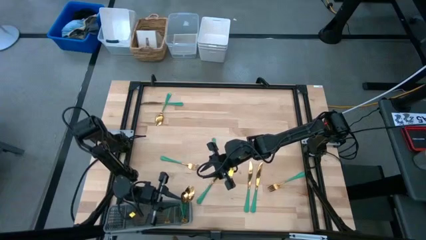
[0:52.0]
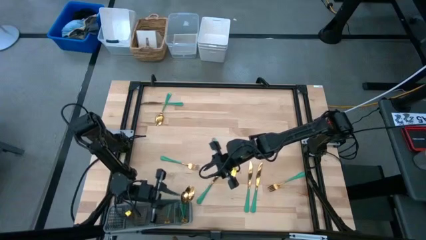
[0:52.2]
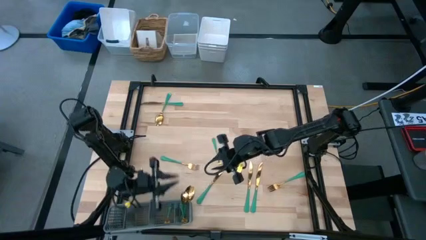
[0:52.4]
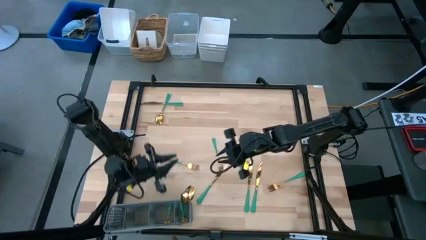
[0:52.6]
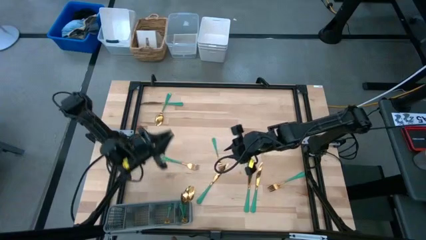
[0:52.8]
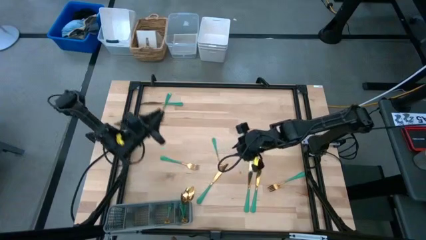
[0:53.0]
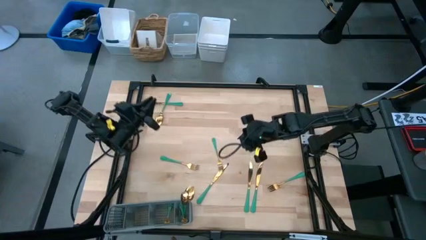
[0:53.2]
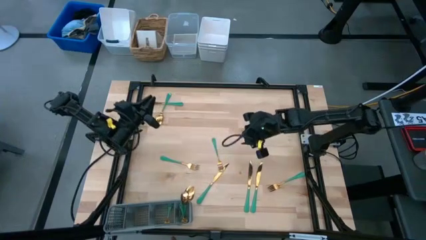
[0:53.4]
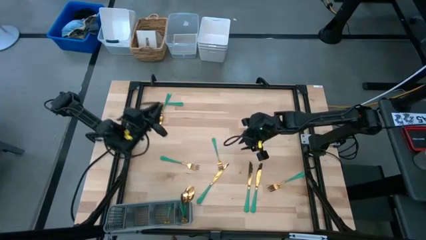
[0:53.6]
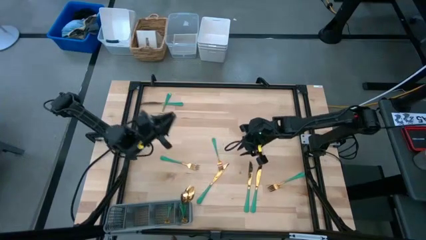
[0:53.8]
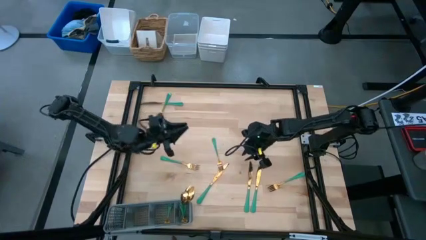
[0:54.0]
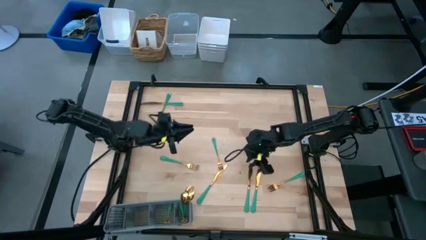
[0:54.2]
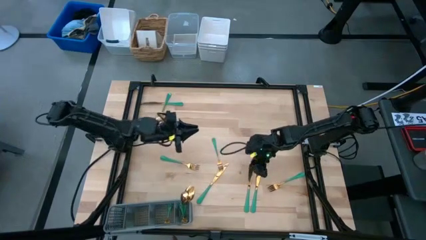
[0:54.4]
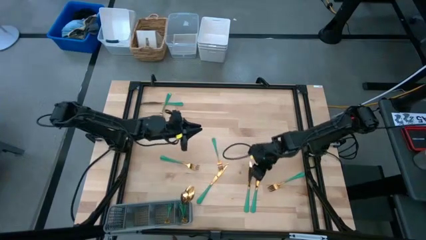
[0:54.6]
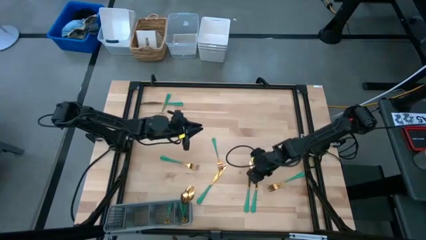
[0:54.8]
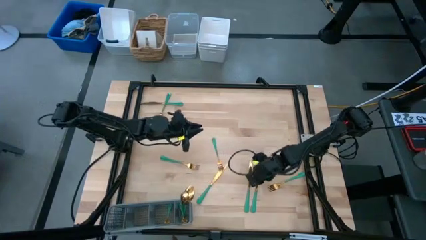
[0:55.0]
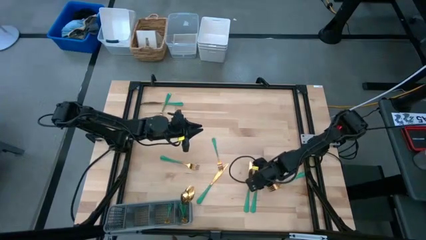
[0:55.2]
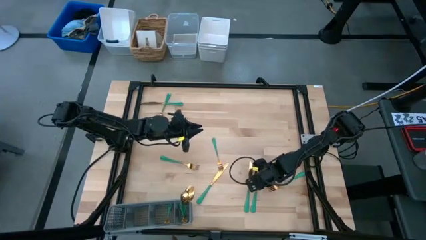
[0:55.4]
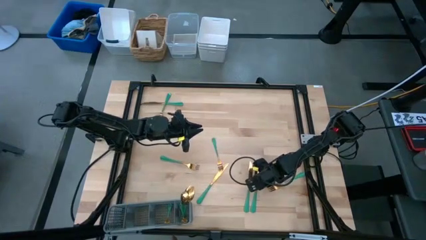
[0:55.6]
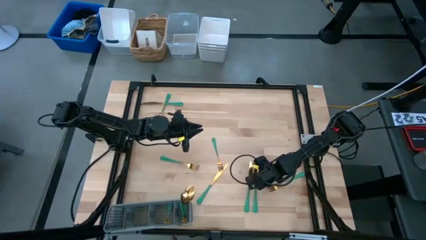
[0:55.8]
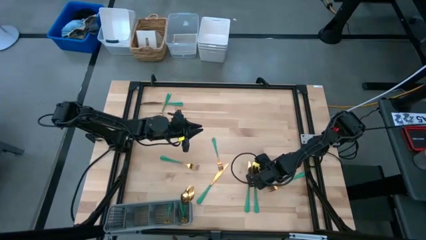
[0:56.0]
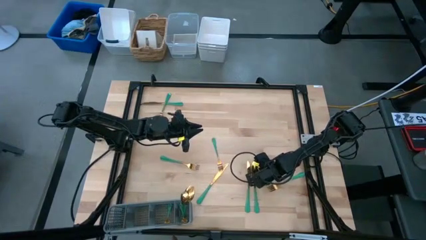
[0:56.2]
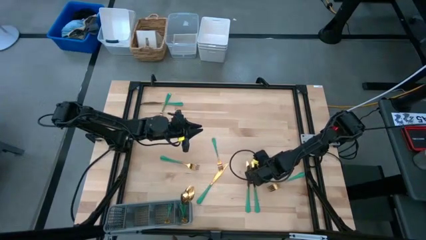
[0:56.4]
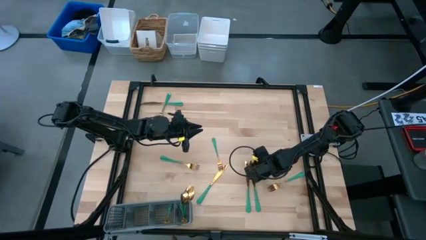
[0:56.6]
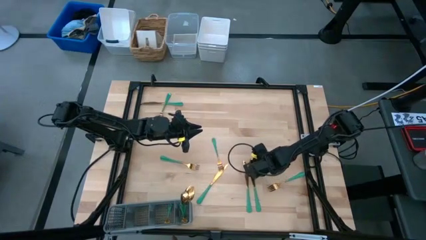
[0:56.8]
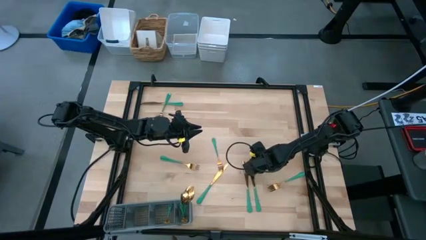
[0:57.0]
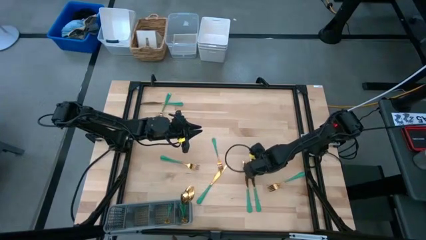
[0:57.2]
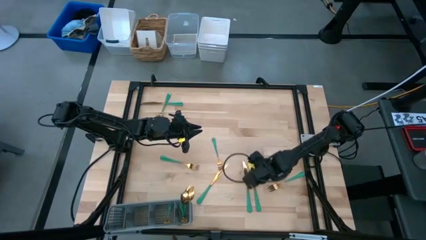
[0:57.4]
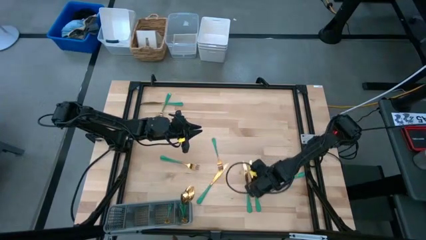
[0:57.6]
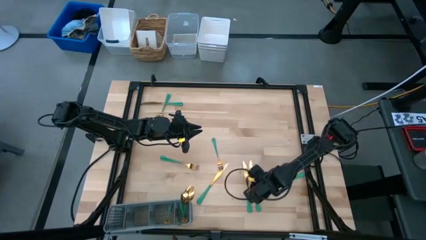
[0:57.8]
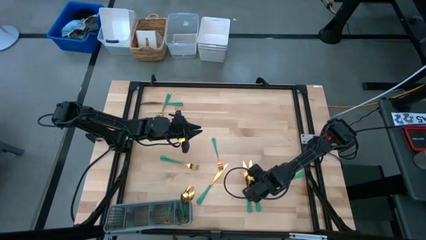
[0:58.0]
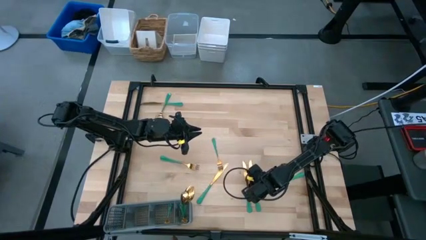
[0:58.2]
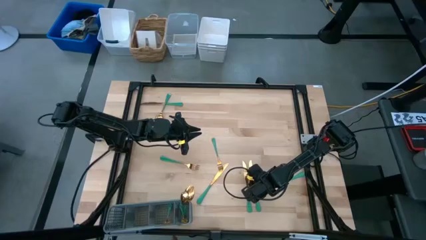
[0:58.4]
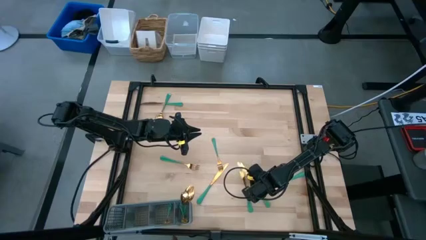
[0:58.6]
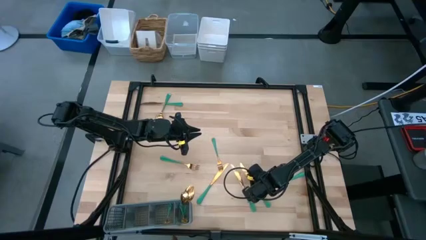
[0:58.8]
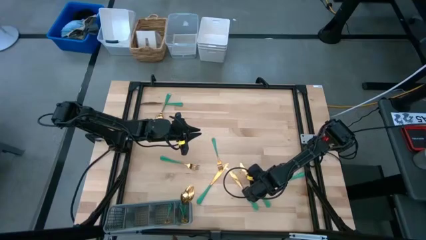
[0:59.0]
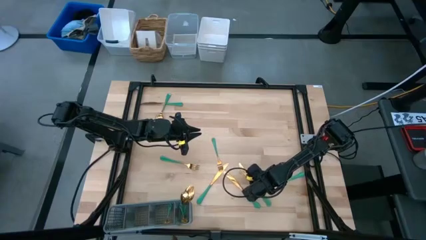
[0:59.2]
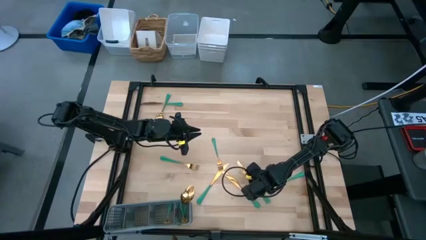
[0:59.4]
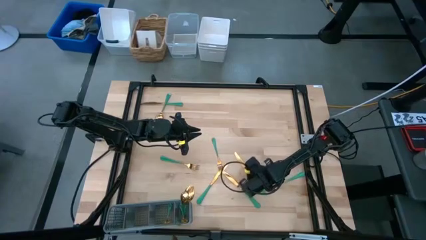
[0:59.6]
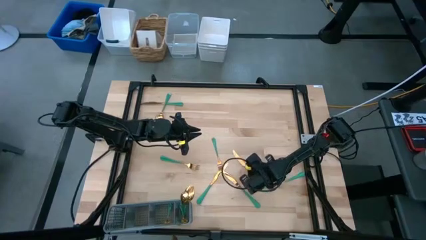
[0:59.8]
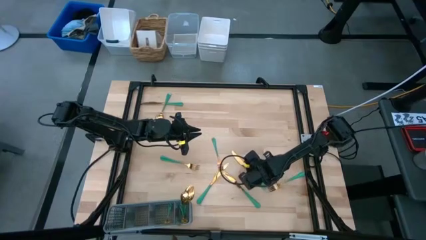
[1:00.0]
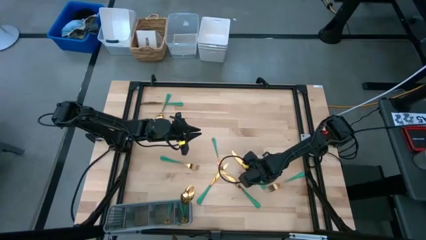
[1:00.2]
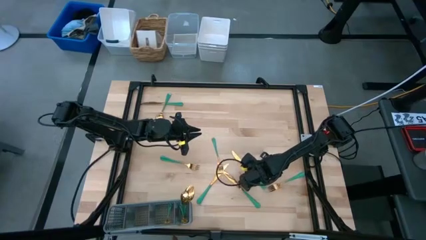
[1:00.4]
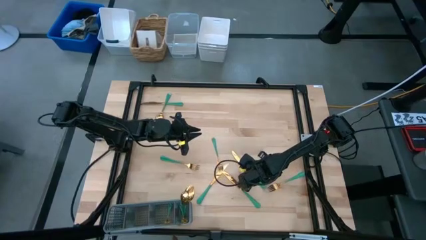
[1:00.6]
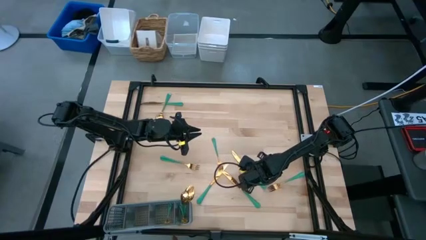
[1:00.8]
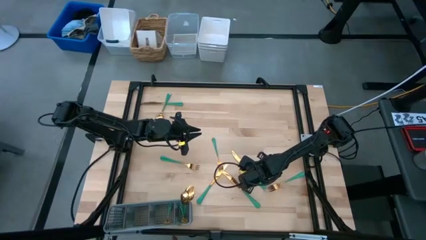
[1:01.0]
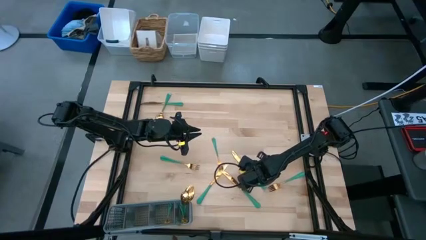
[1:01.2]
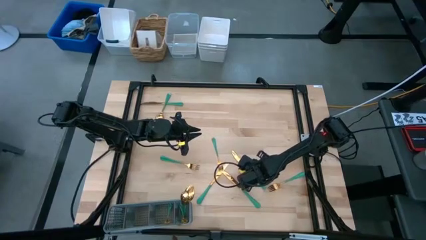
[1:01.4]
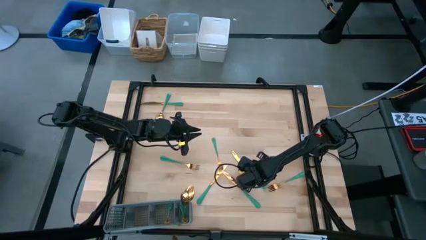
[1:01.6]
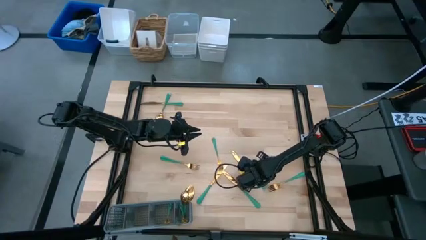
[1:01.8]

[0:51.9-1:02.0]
Task: Sort silverware
Put the right knife into the cutlery rack
